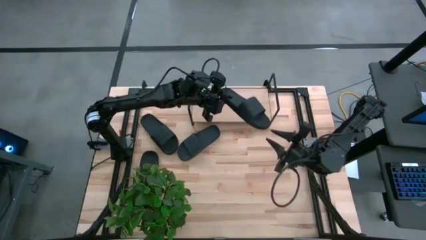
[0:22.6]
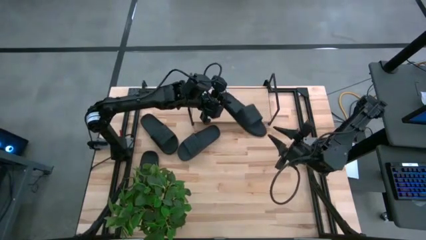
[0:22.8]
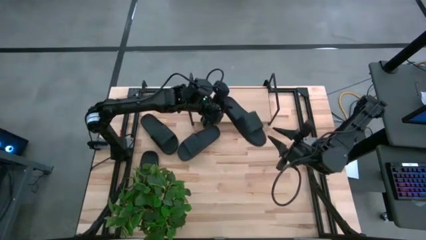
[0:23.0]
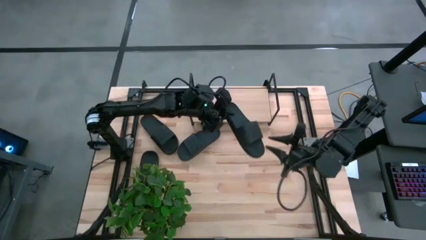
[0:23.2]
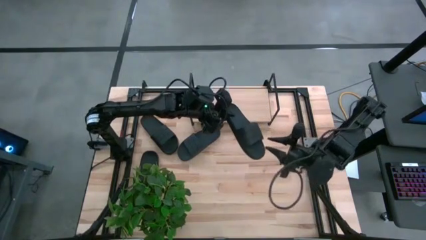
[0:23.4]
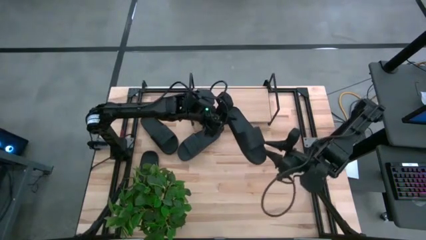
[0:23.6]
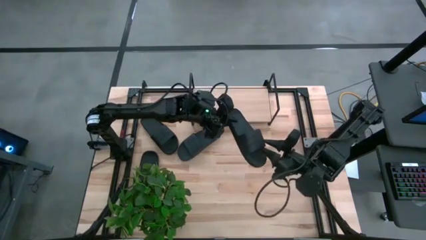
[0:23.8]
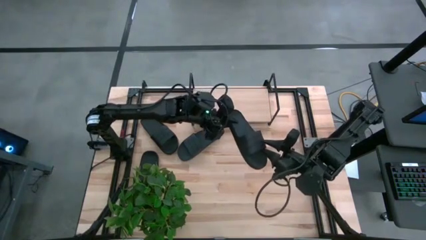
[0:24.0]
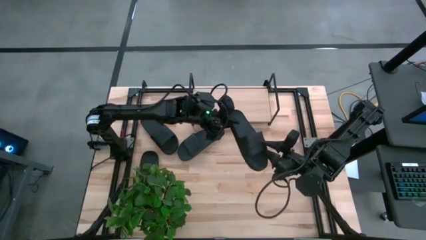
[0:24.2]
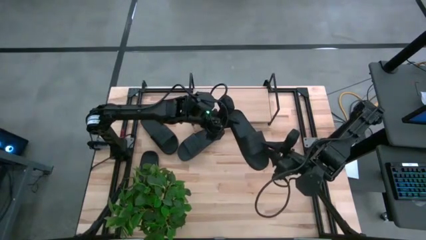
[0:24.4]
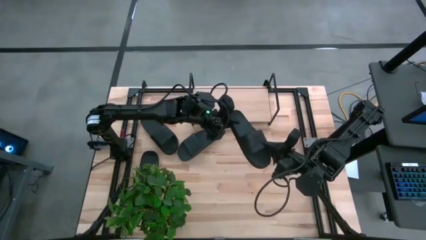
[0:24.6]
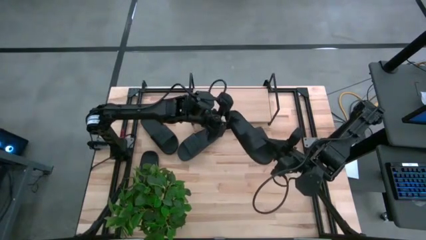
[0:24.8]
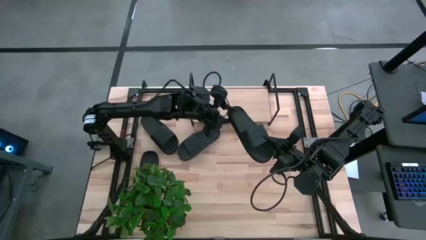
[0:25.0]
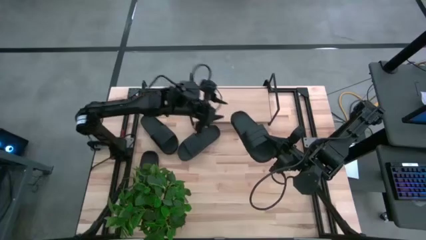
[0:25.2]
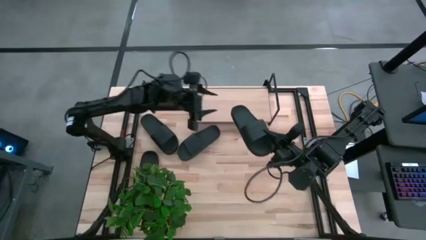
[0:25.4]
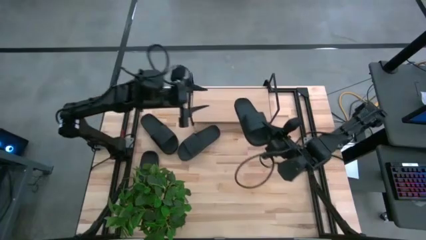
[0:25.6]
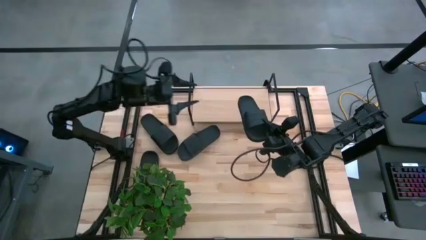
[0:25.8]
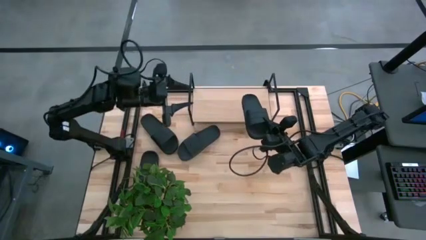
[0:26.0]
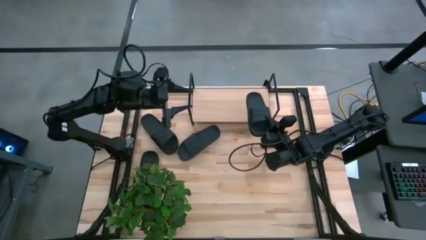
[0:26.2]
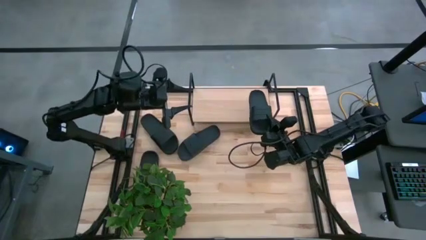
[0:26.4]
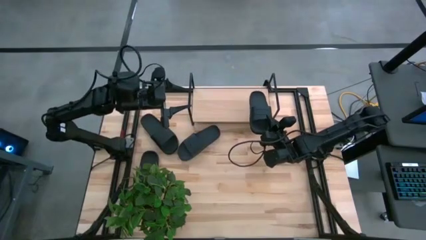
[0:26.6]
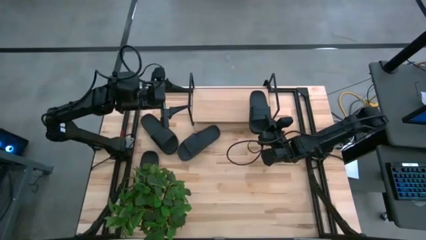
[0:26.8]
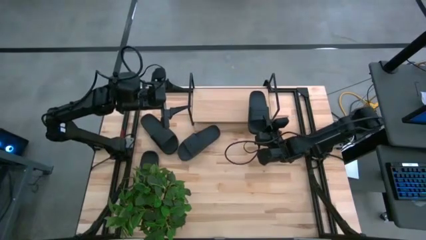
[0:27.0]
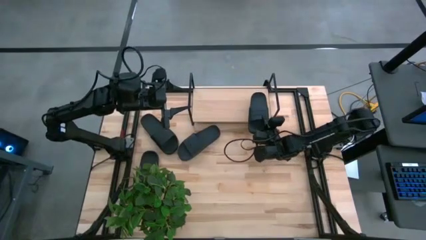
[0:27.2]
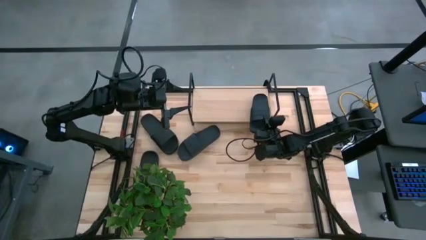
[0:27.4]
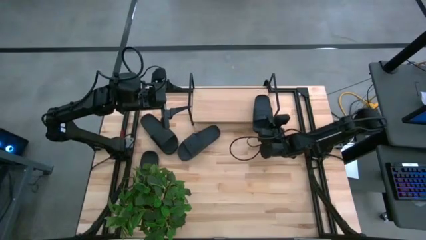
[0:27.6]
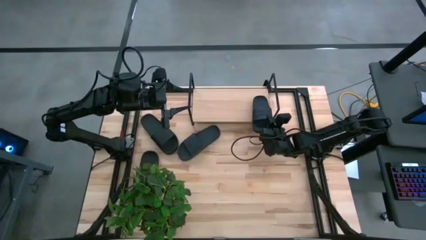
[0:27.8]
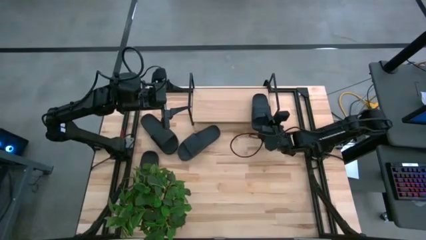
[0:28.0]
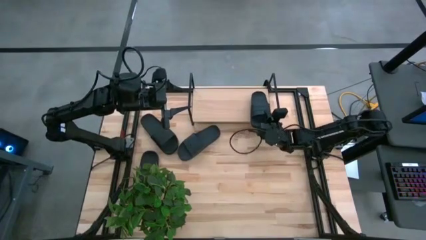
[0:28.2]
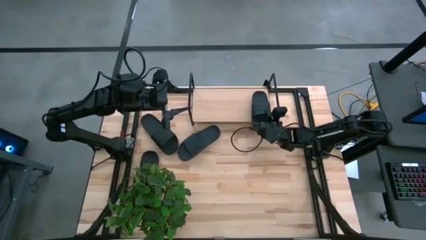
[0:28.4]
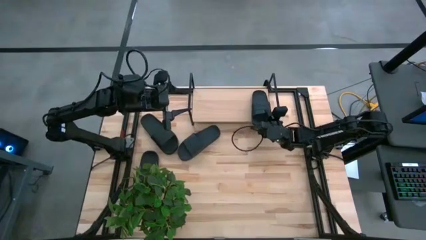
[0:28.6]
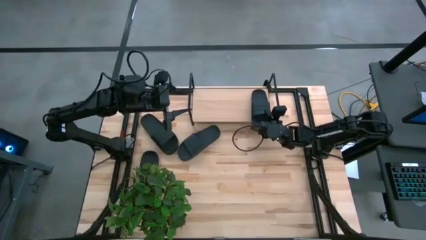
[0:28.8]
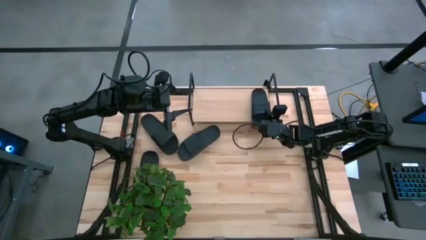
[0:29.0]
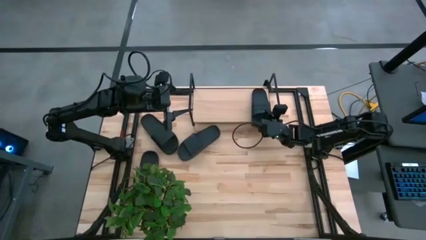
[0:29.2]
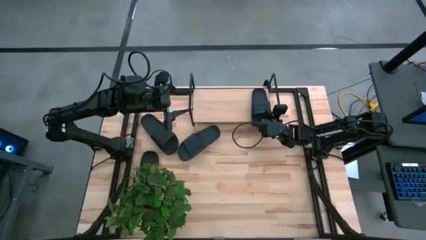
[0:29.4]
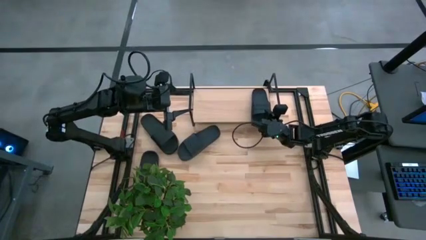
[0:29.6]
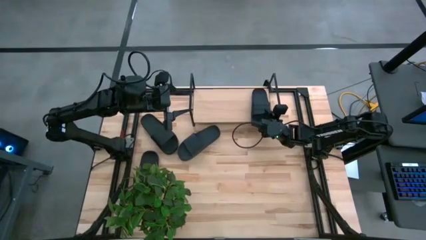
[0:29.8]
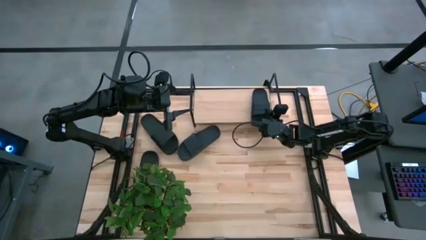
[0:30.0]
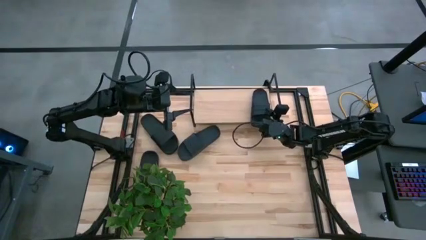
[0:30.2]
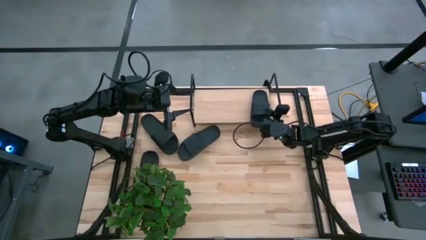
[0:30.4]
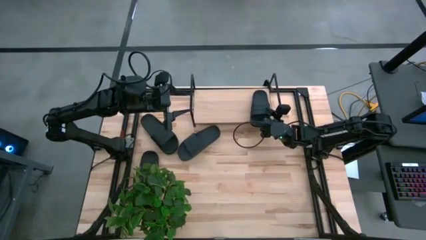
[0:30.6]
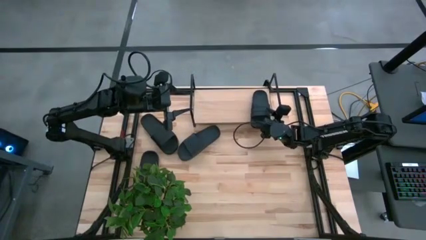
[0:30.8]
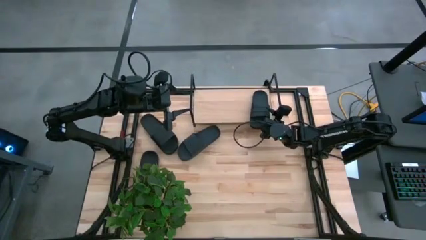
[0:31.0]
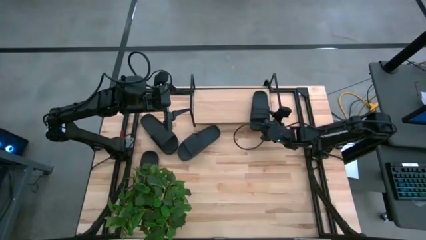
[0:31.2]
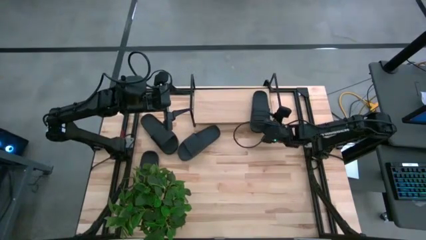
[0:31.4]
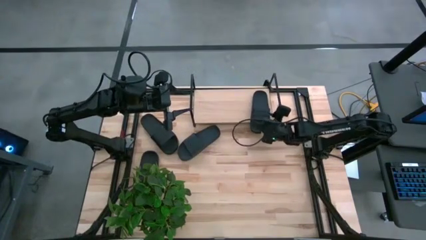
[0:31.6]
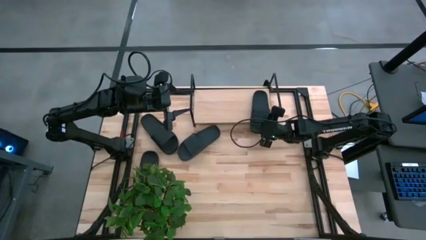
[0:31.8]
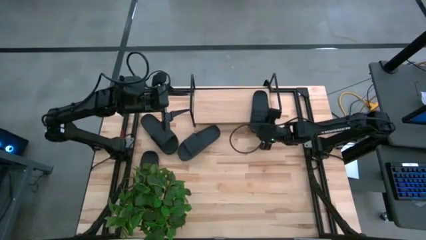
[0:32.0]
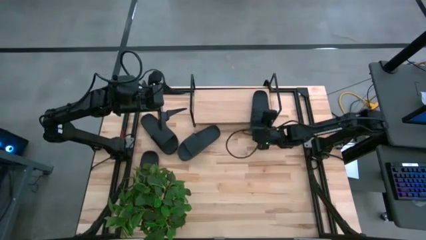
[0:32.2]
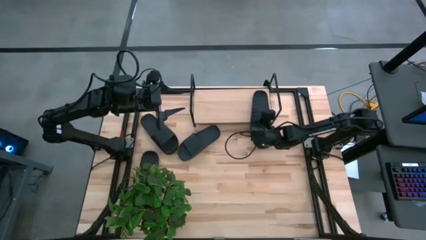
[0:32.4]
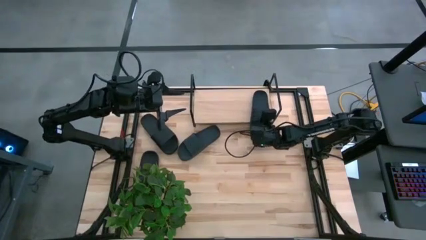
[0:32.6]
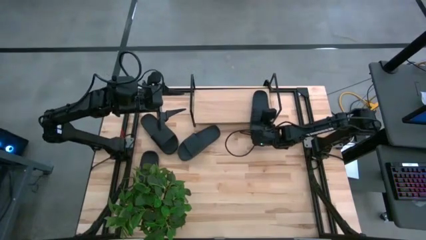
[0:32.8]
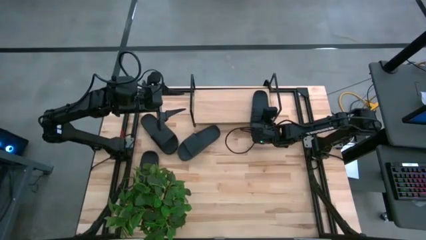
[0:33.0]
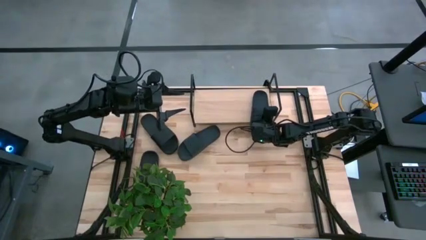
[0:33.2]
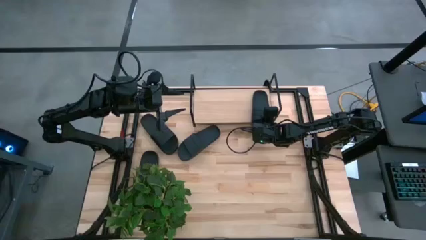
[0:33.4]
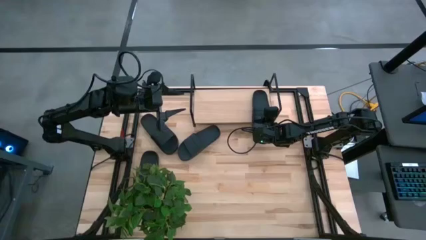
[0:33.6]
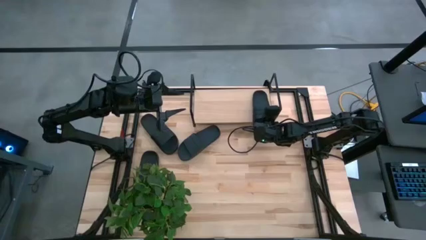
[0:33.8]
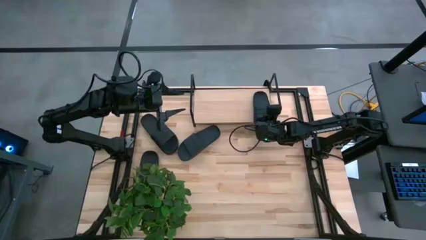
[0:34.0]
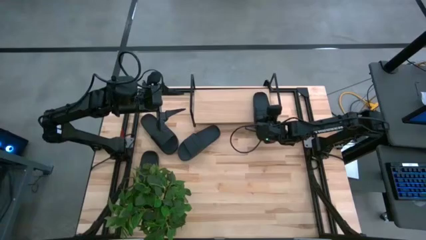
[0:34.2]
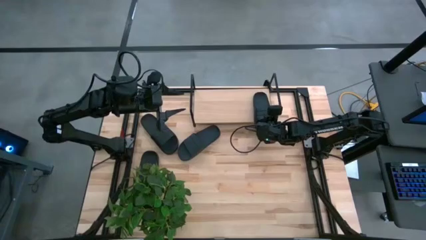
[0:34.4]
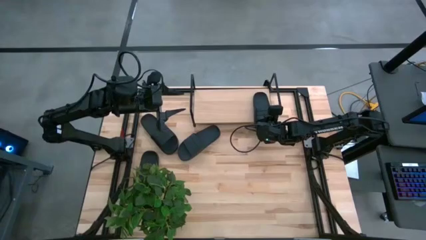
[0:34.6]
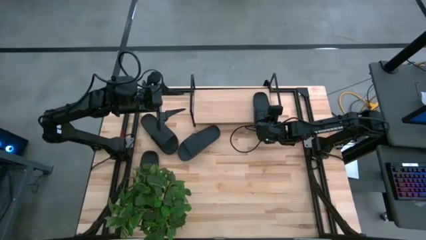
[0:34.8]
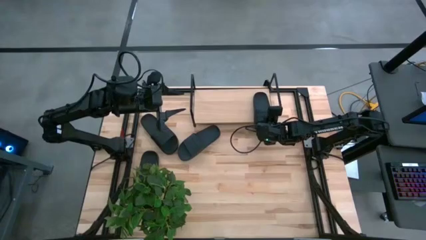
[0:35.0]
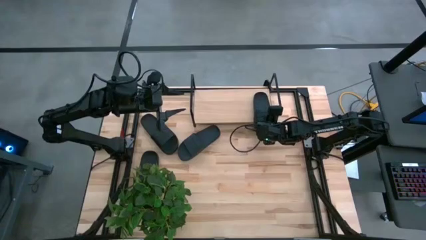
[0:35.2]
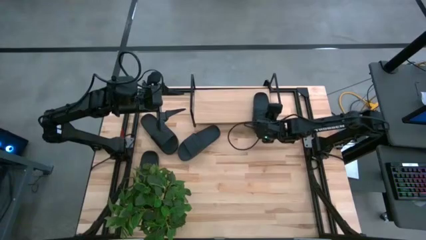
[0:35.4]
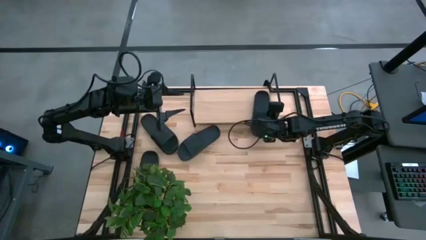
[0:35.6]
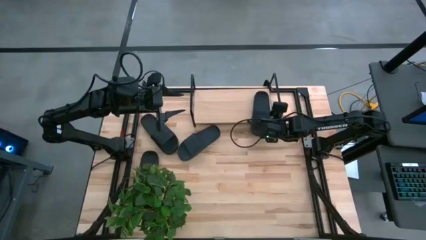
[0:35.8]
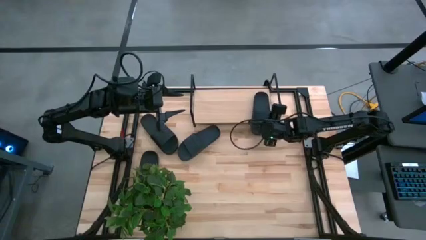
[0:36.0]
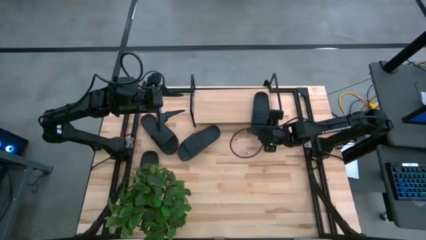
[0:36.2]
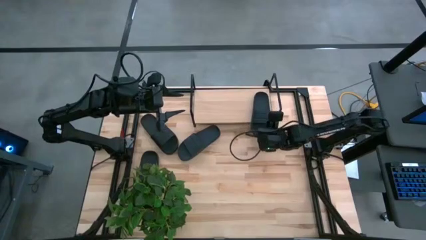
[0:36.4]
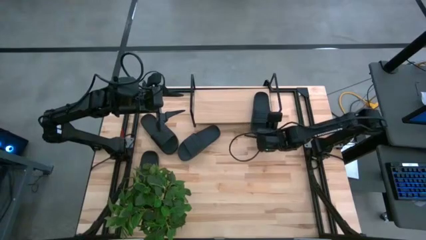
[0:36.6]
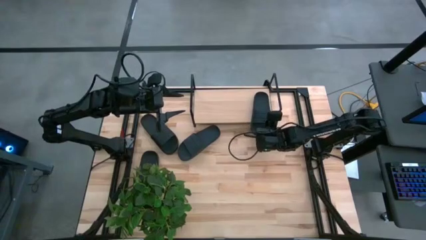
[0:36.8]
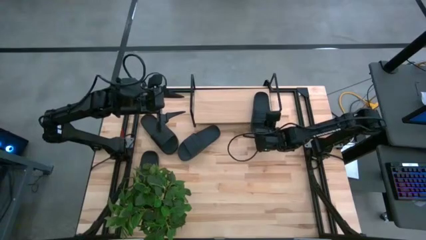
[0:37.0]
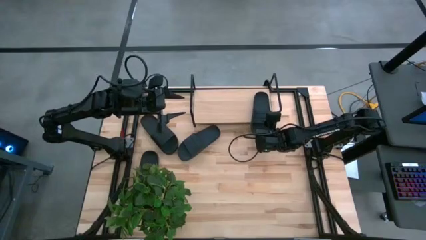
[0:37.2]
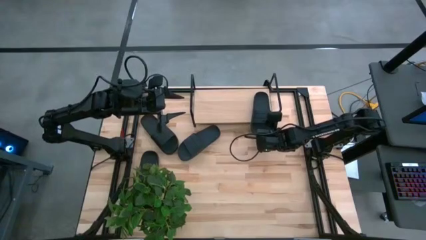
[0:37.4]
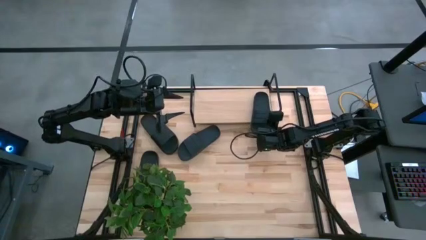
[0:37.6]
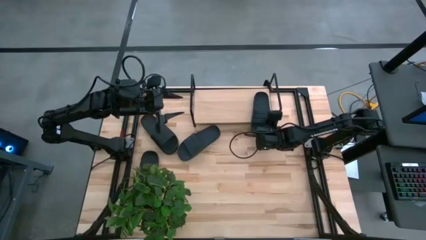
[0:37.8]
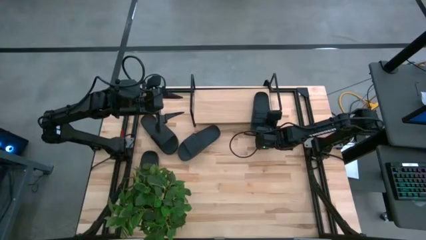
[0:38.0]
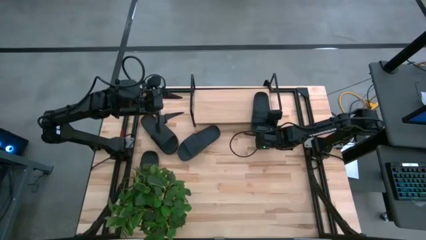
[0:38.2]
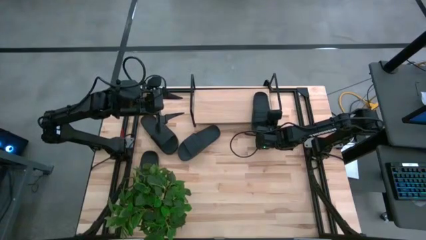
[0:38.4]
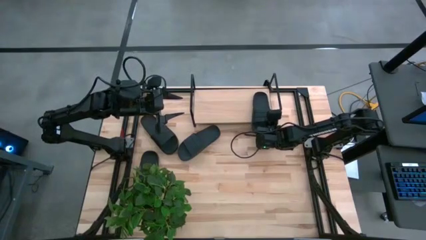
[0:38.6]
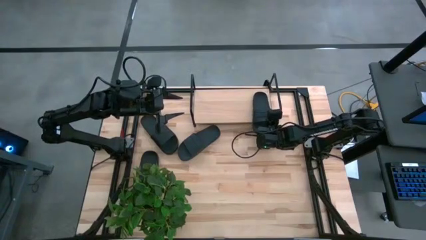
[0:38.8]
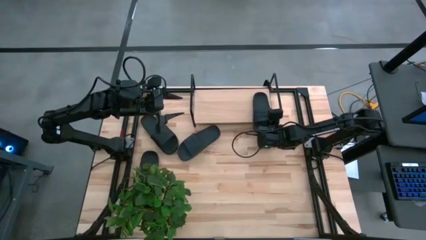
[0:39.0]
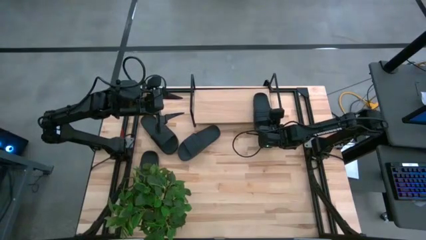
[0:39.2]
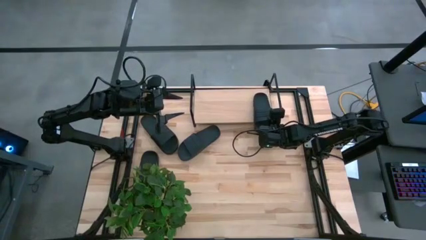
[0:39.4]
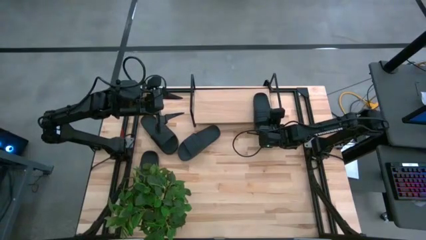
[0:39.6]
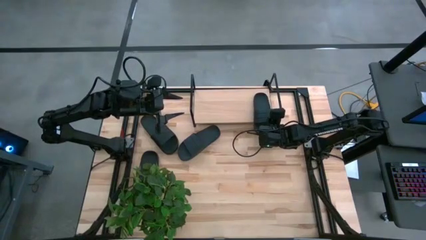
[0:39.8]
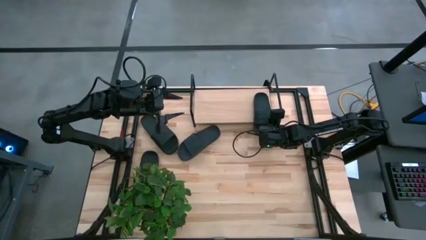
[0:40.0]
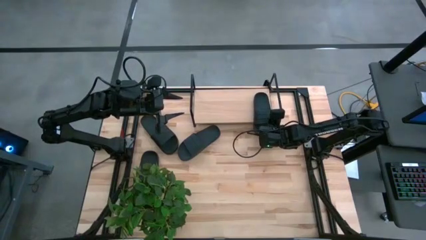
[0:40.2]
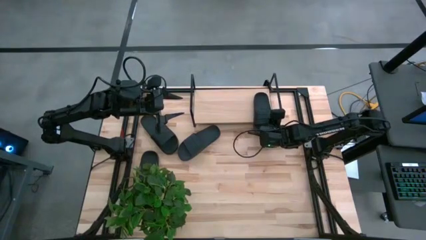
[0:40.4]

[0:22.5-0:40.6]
Task: Pick and place slides into the shelf
Put the black slipper on the shelf
